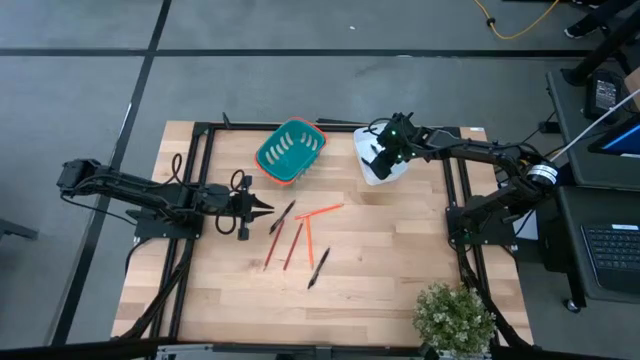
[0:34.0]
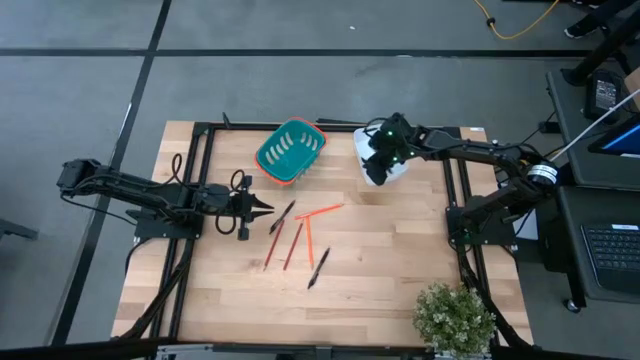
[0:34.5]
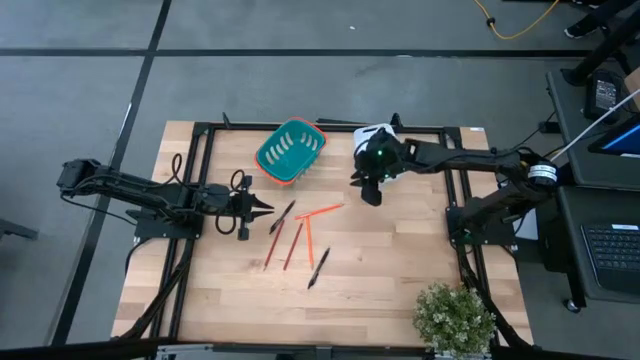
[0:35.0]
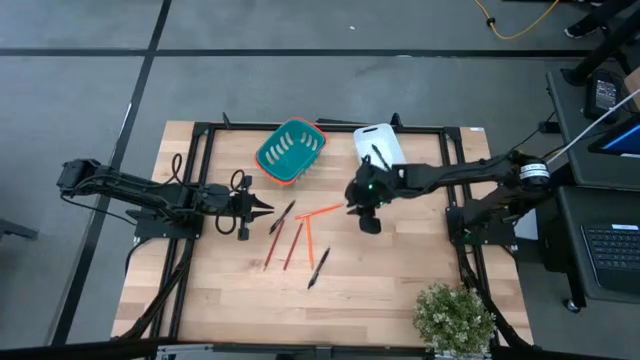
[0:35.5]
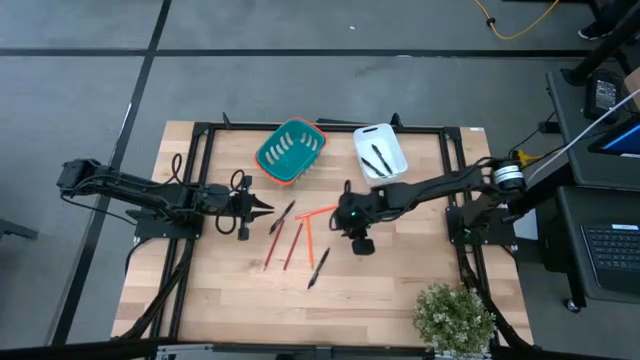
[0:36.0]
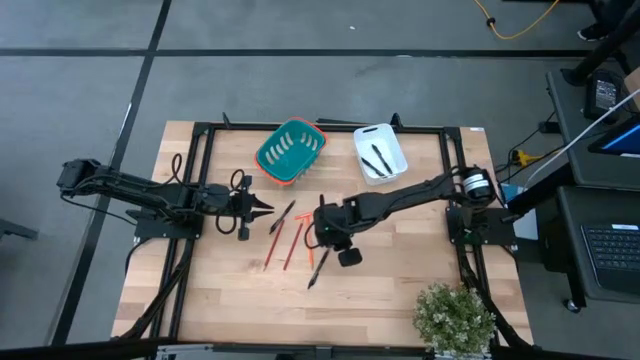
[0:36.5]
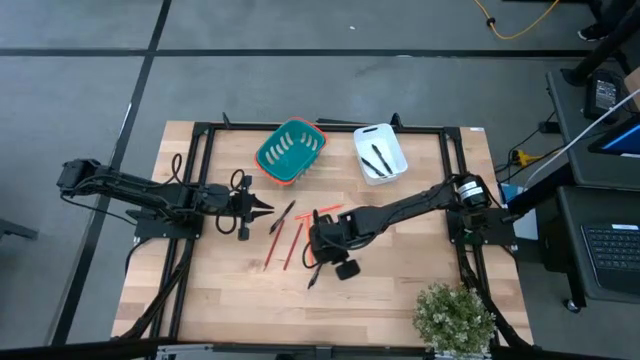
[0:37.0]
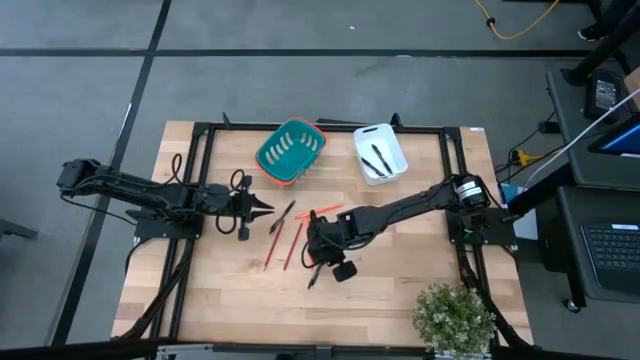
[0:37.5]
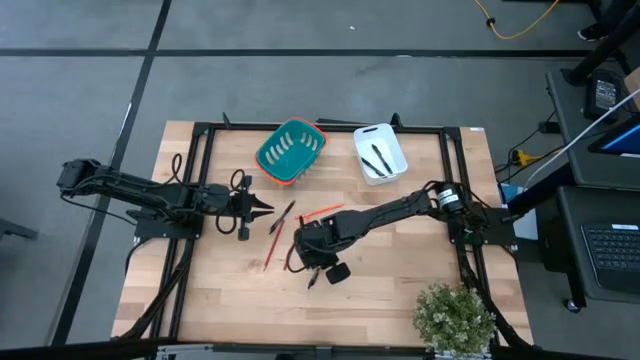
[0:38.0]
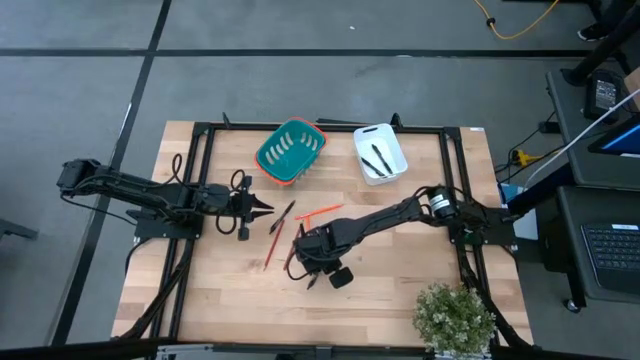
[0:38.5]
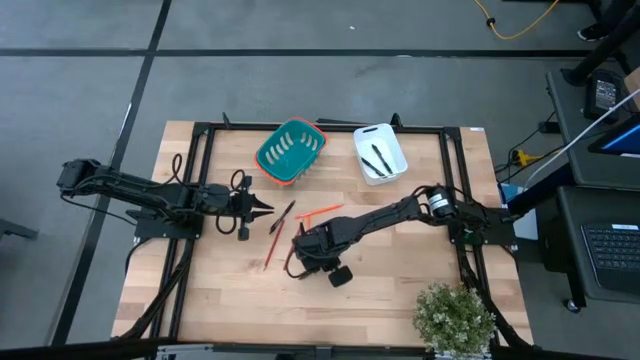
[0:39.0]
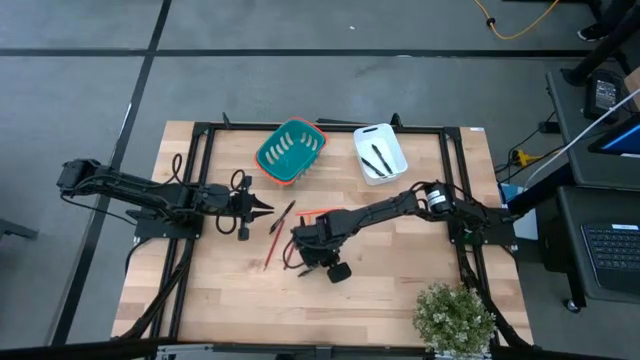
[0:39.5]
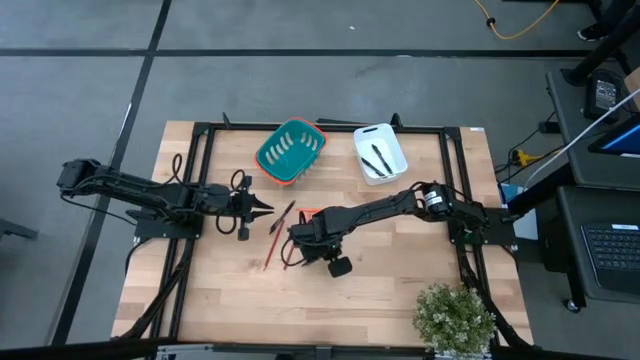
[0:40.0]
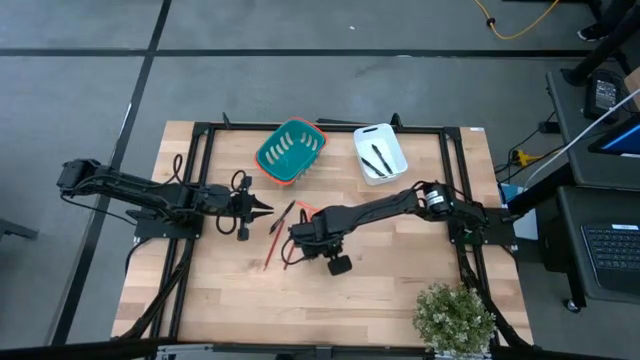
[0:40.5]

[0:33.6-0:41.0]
Task: Sort pens & pencils
Put the black pen into the white bin

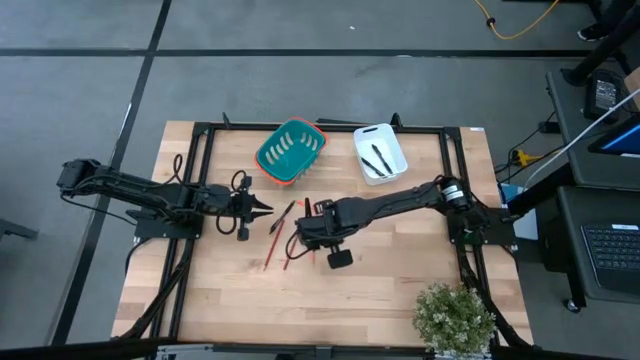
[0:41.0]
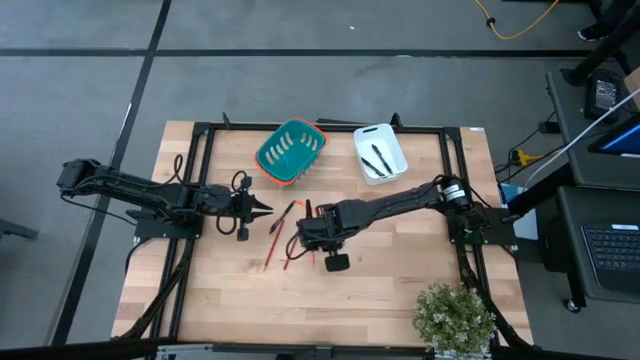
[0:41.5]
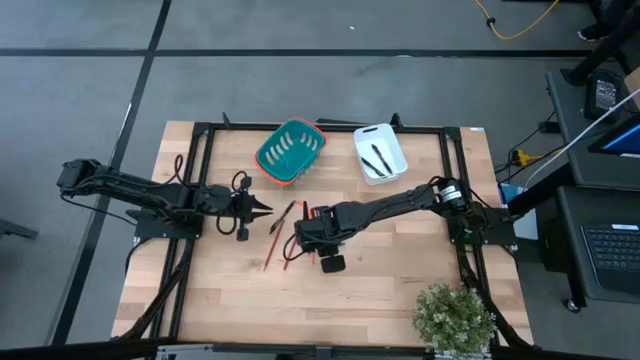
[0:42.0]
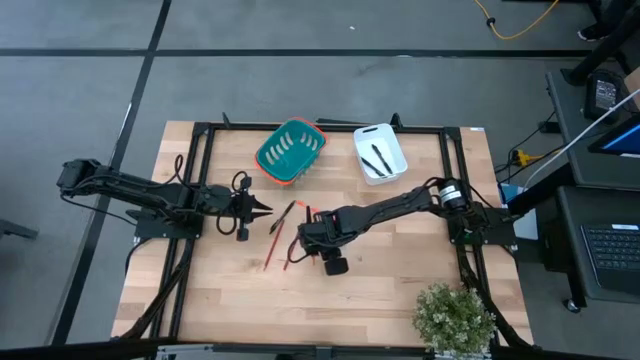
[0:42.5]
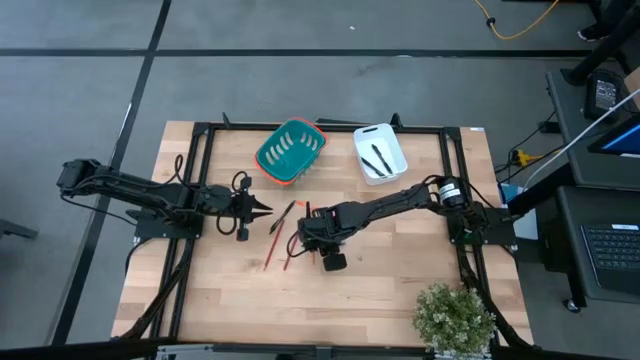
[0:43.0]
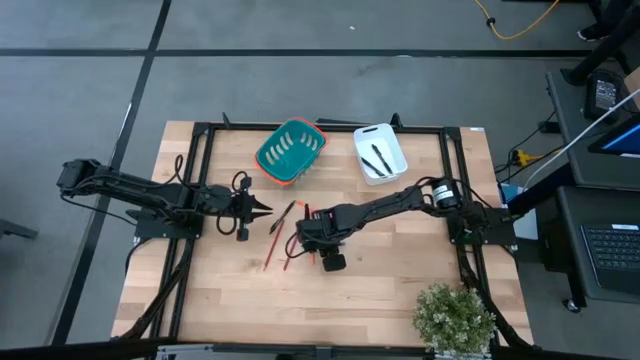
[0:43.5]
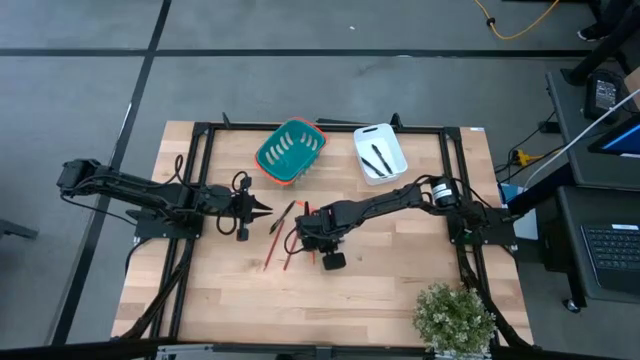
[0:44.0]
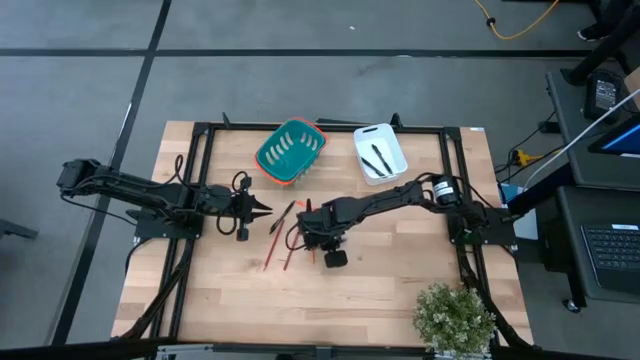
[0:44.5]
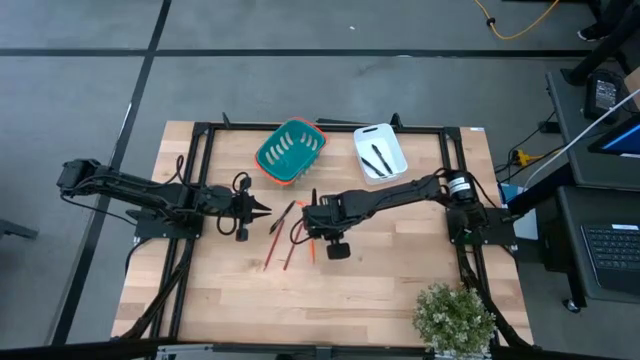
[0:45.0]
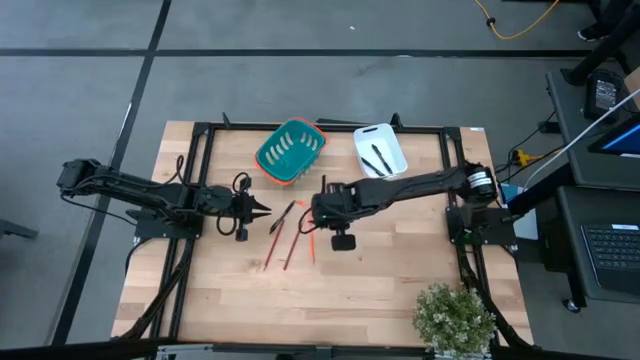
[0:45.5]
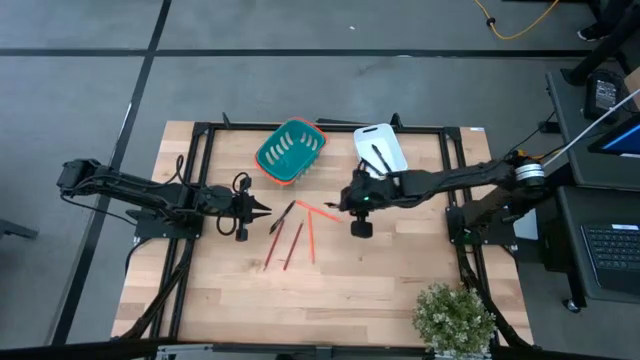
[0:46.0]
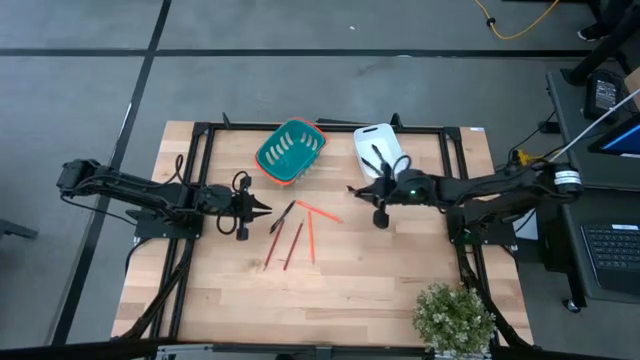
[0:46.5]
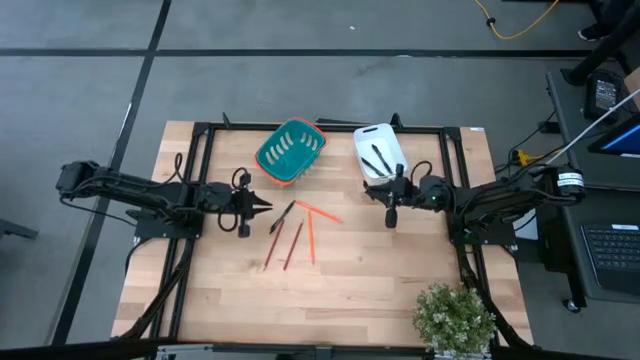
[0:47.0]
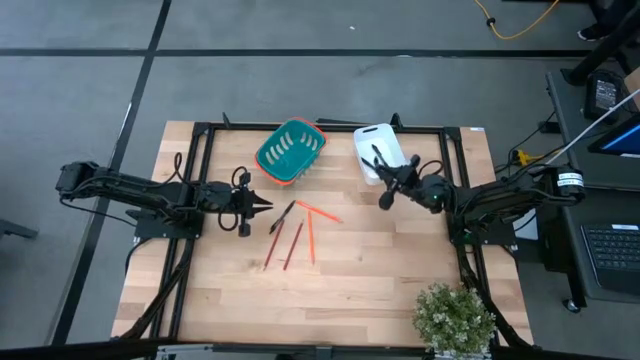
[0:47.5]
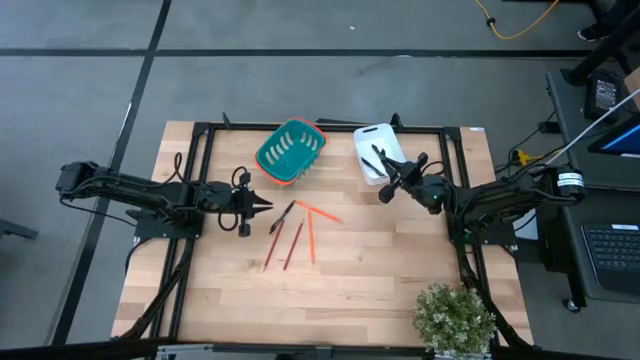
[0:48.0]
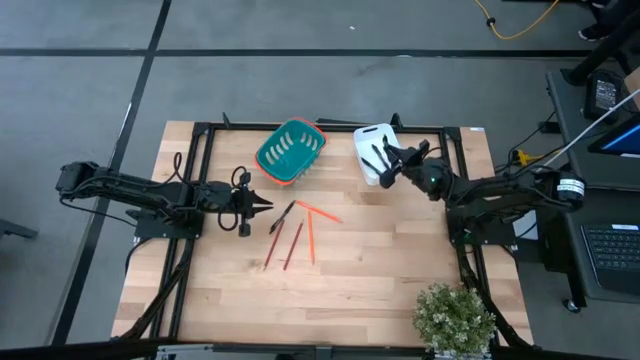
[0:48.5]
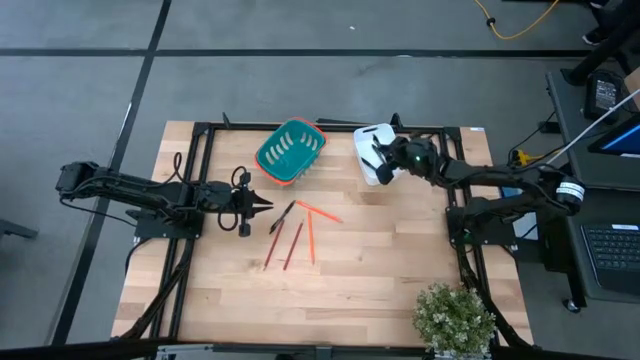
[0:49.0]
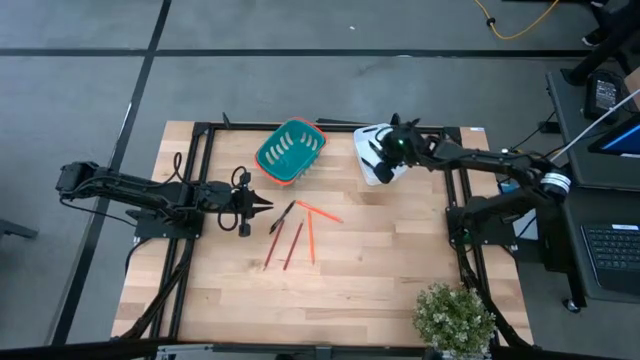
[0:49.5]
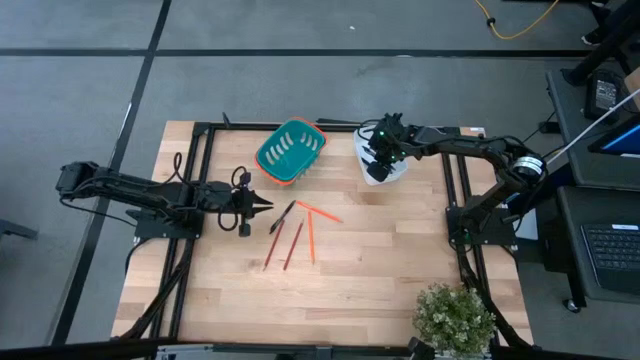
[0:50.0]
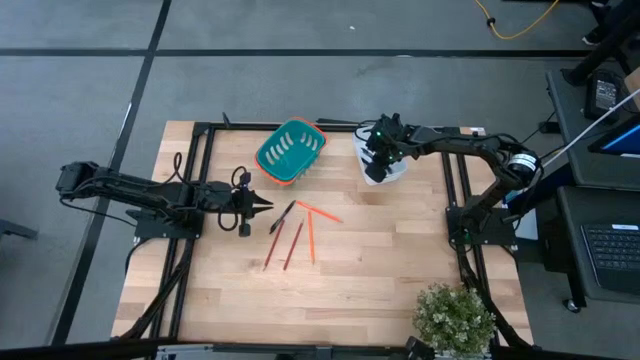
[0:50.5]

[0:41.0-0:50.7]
Put the black pen into the white bin

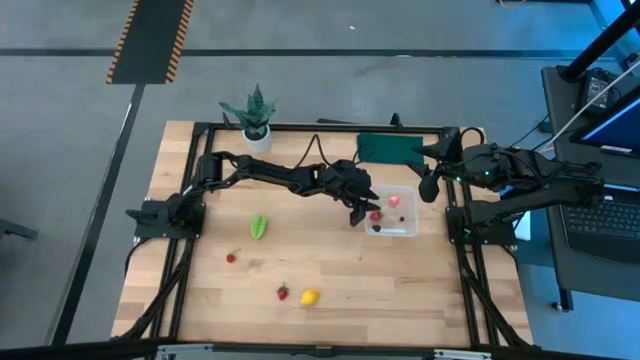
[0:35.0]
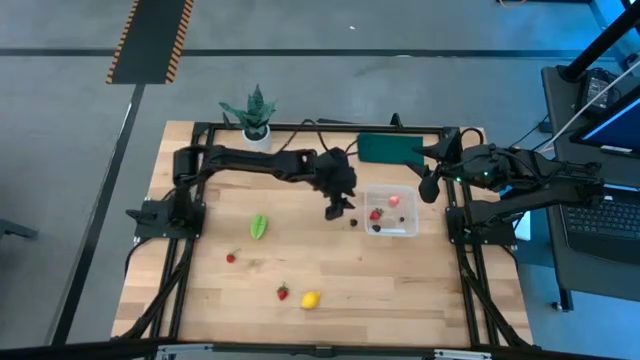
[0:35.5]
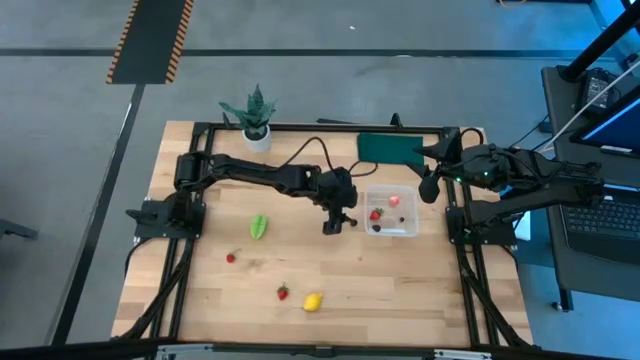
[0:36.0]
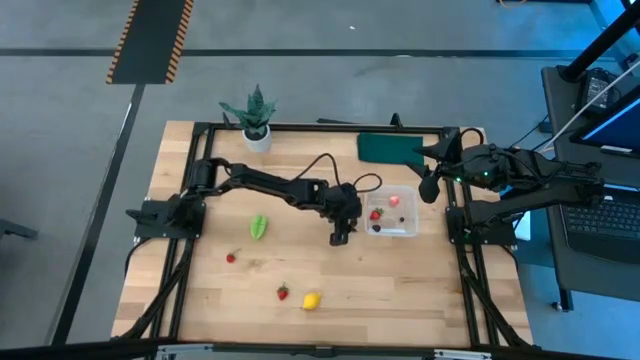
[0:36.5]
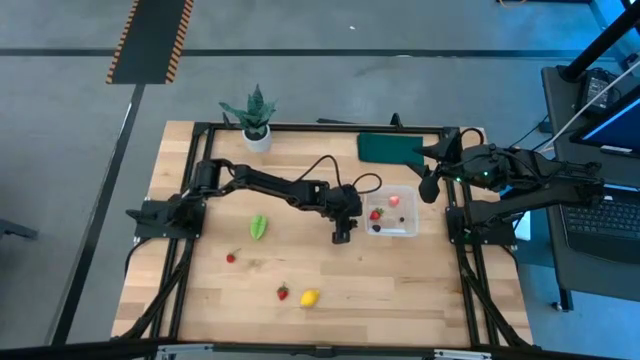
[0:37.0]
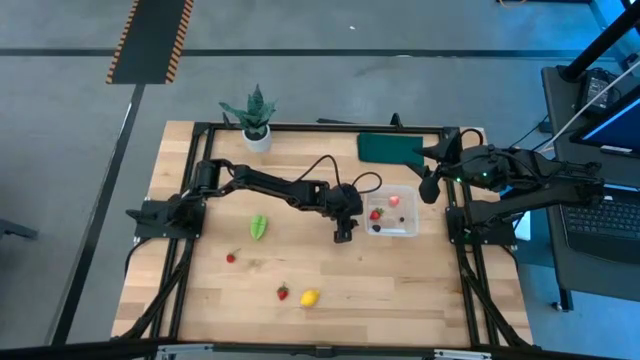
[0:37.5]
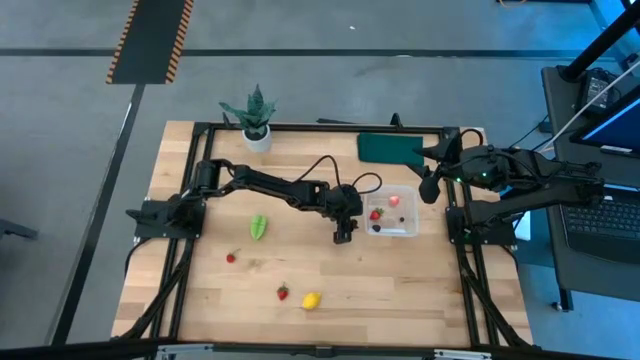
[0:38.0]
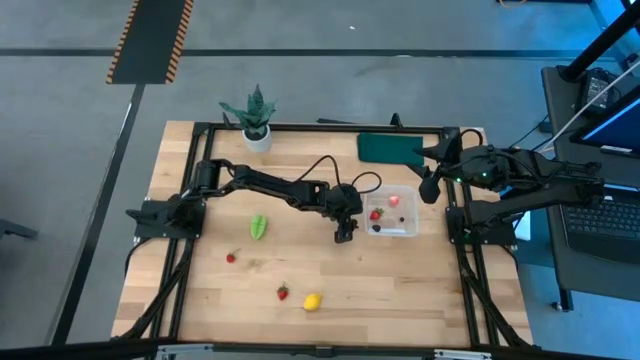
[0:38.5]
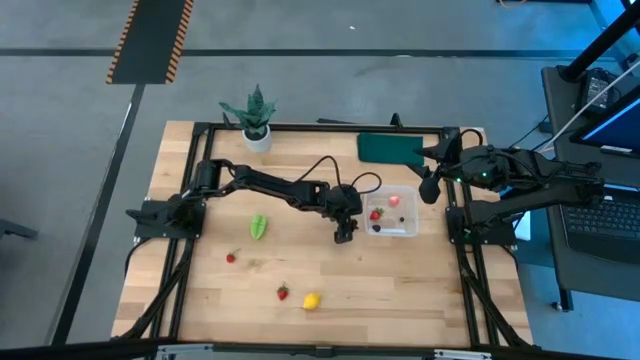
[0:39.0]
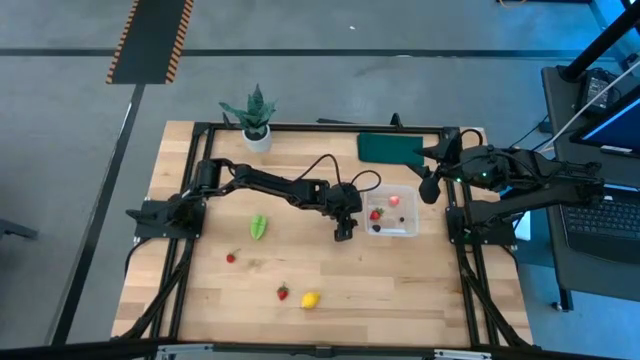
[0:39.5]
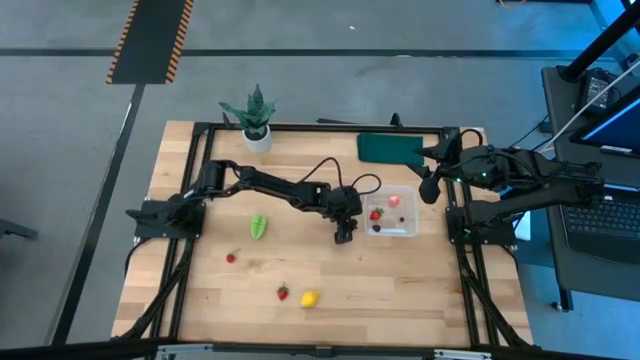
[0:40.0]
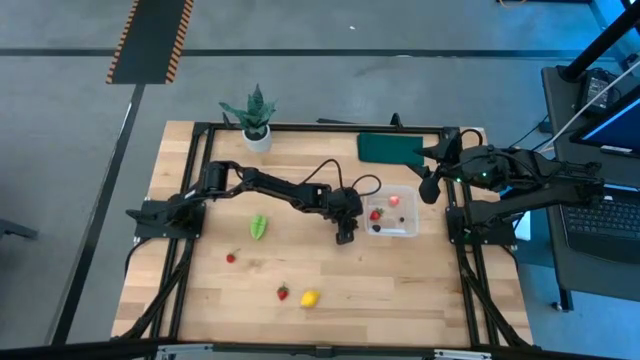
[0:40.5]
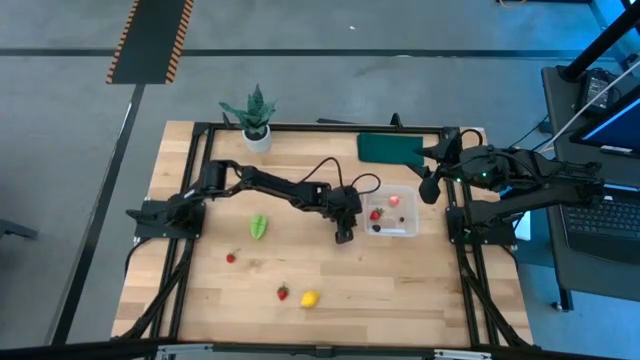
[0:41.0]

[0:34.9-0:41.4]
Task: Pick and placing Produce into tupperware
Put the black cherry into the transparent container
